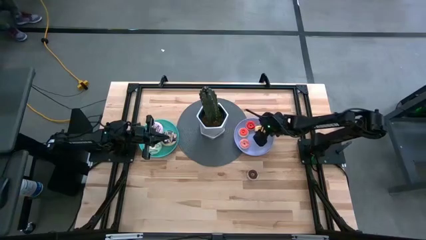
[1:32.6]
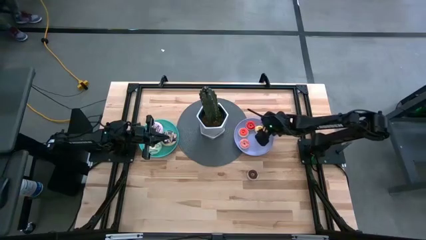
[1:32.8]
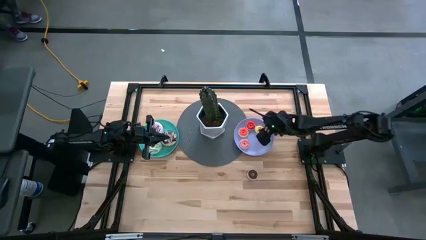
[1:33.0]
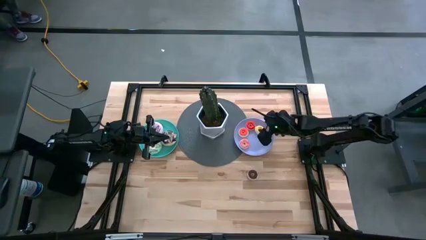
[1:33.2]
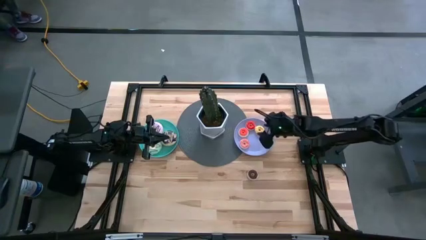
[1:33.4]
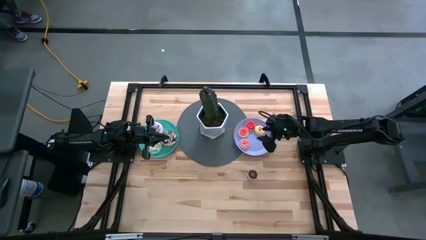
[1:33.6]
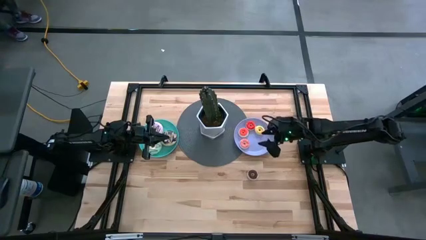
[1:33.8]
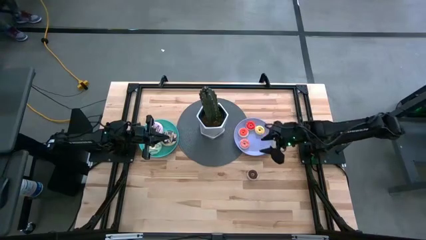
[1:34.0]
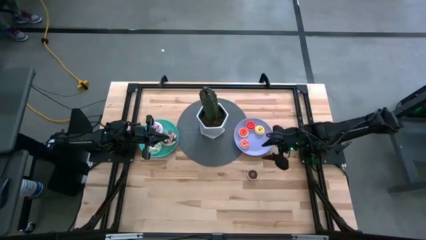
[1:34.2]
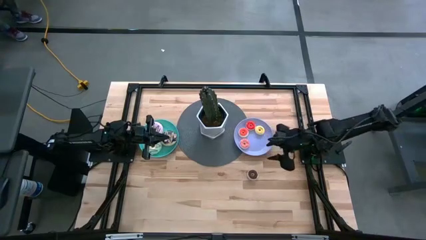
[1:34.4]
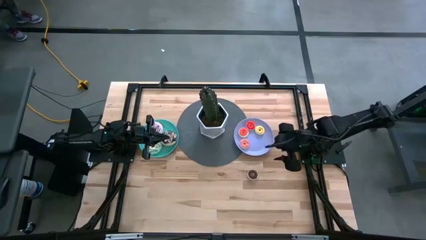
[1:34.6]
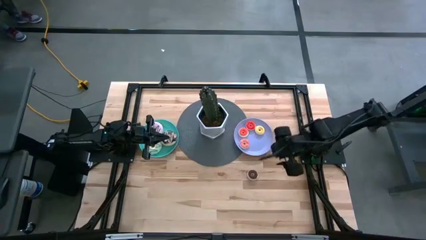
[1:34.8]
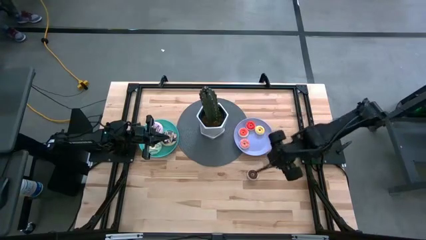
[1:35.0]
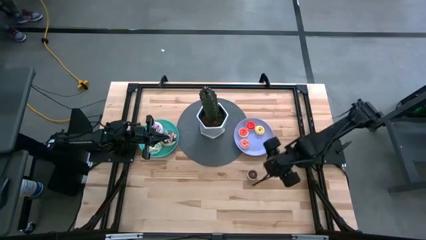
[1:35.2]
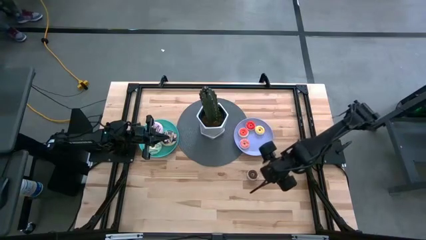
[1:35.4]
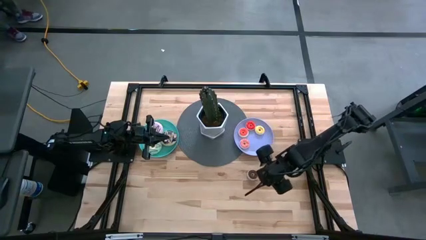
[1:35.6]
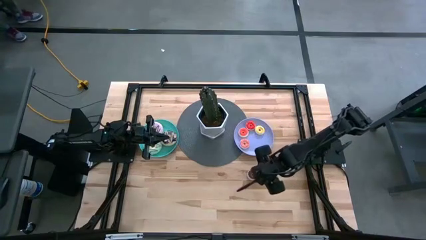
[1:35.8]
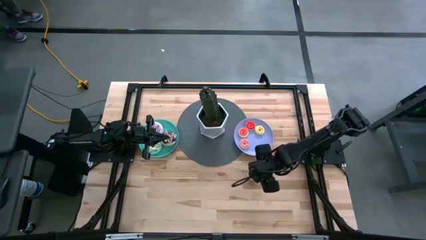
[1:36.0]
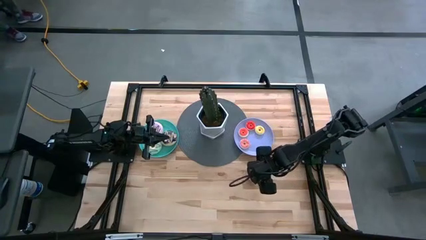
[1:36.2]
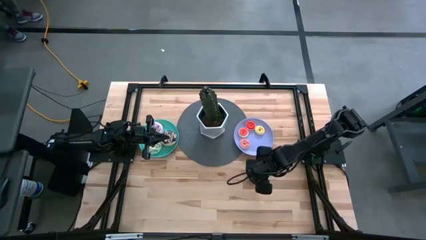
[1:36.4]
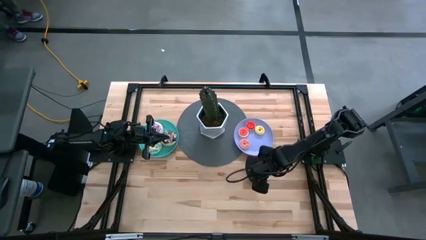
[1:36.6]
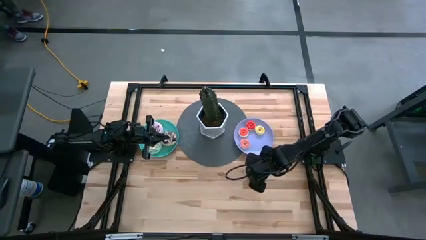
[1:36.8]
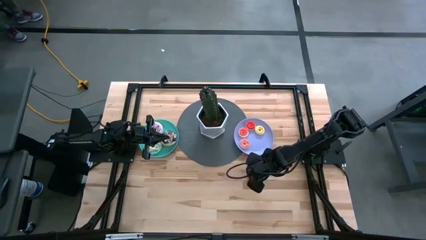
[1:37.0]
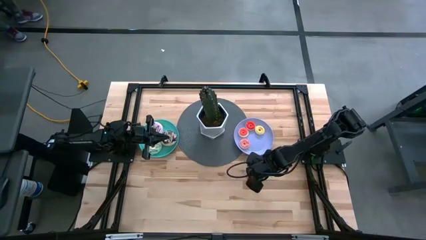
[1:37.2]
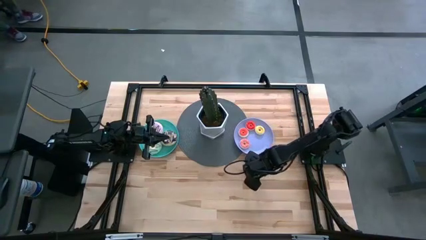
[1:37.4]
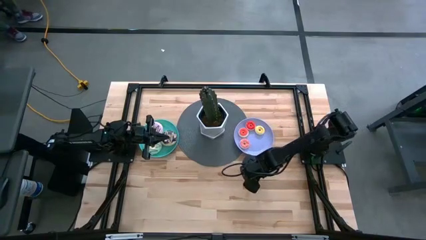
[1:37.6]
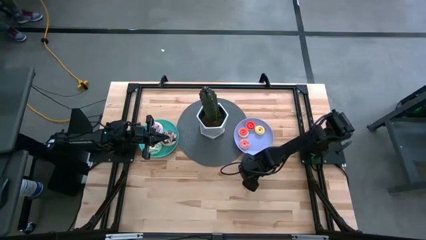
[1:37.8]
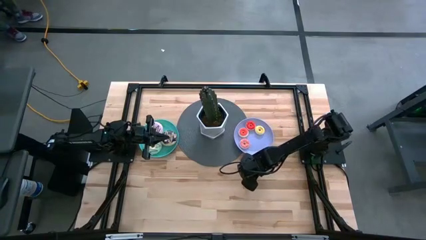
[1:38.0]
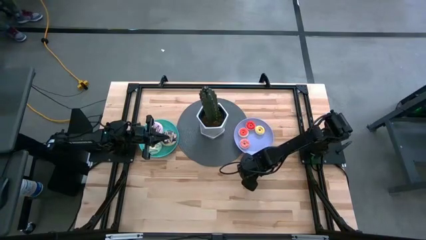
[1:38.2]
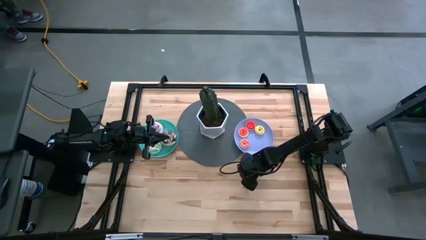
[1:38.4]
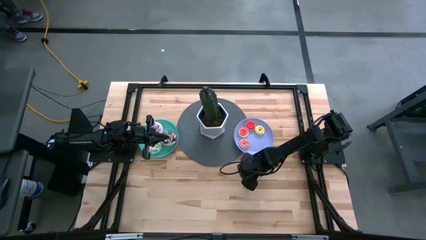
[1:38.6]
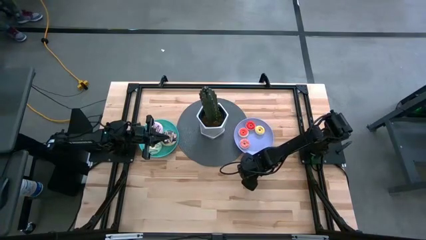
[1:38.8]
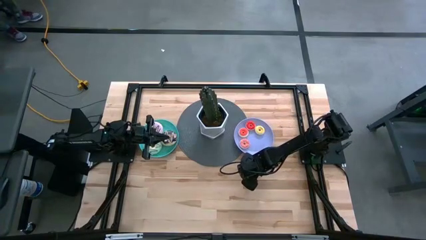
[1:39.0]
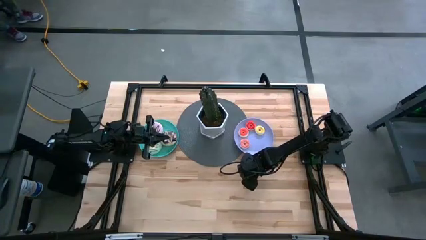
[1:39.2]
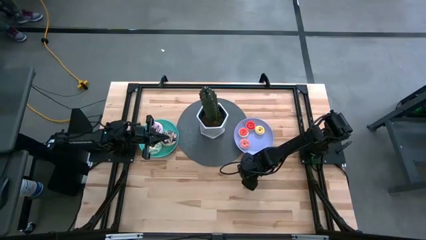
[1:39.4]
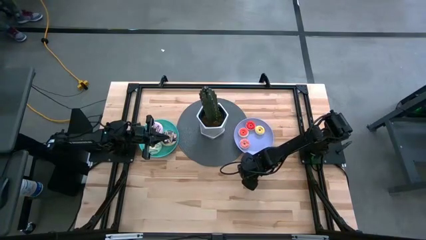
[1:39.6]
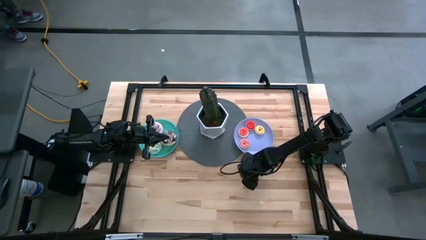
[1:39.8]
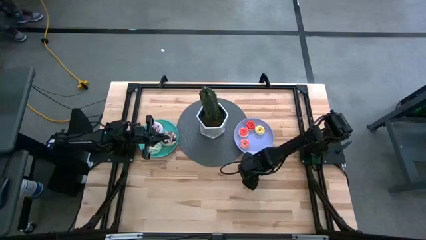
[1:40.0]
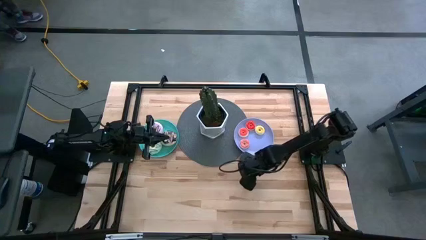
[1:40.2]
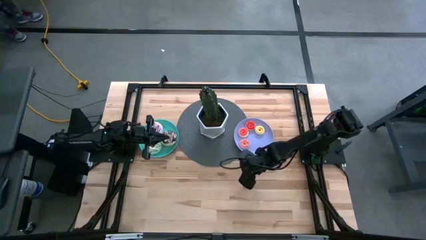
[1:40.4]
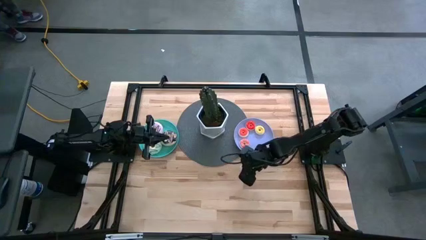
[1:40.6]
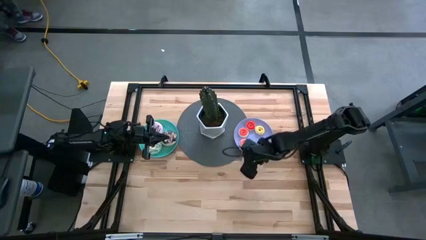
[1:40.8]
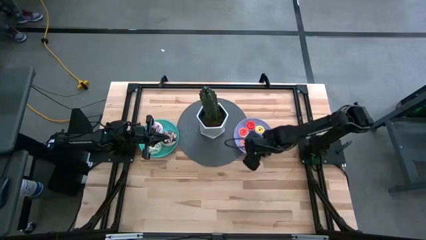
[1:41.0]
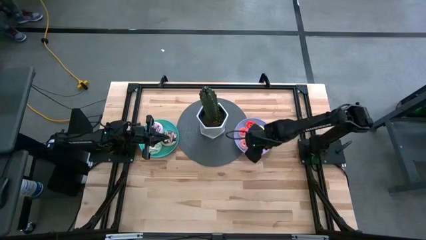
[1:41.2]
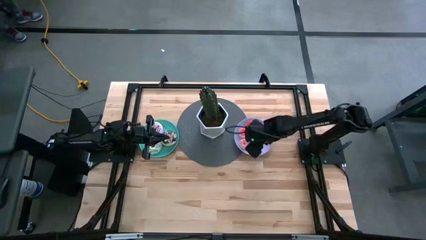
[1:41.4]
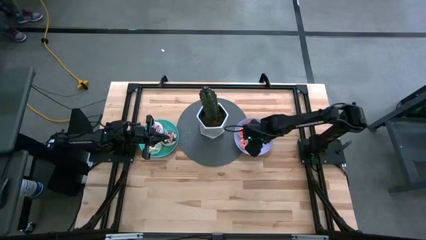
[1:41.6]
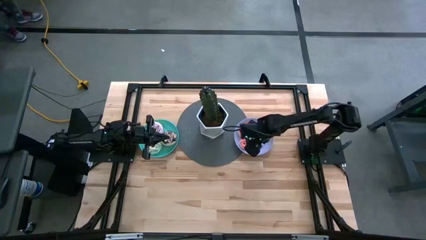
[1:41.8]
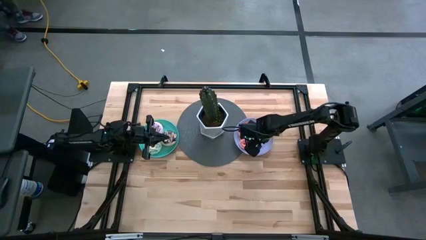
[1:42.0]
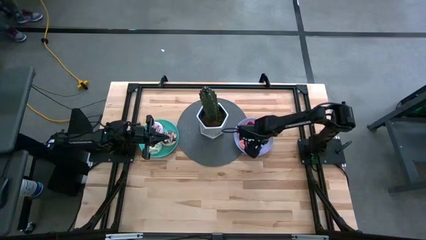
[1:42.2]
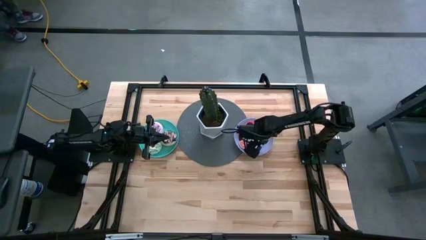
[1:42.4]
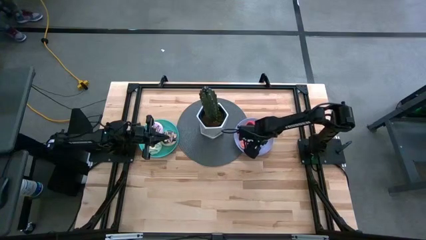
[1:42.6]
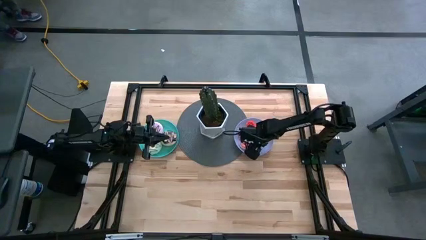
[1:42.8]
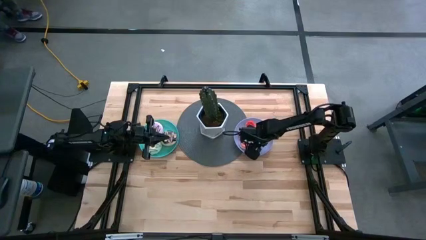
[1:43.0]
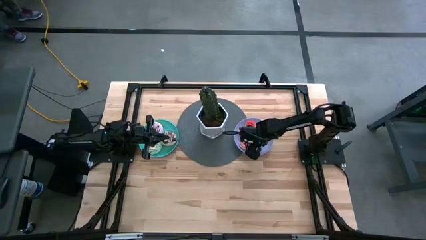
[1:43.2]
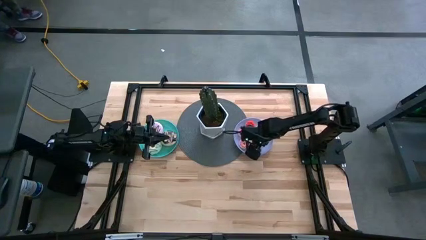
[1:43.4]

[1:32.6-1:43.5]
Task: Pick & Place donuts
Put the small brown donut on the purple plate

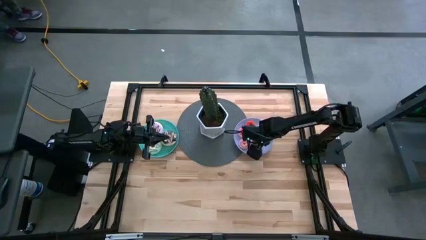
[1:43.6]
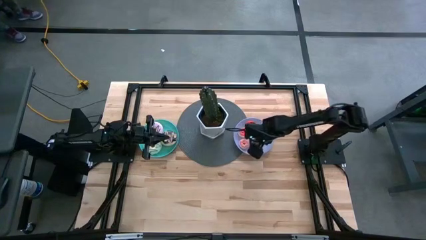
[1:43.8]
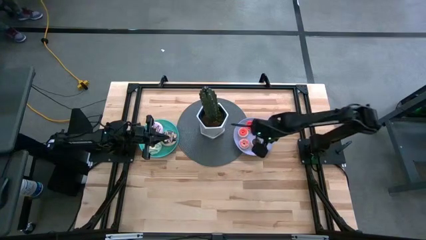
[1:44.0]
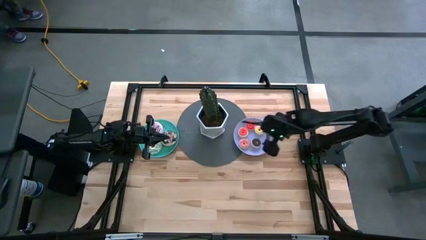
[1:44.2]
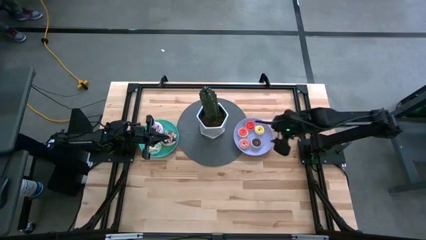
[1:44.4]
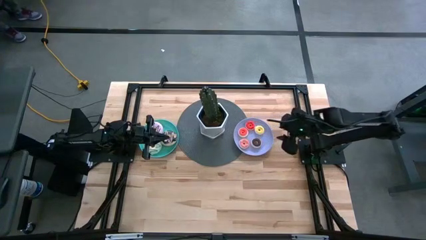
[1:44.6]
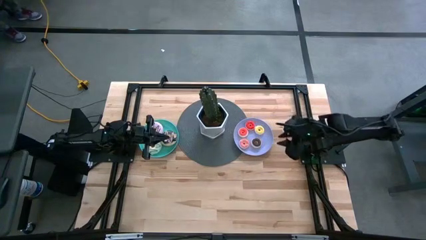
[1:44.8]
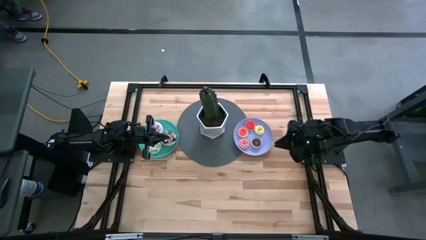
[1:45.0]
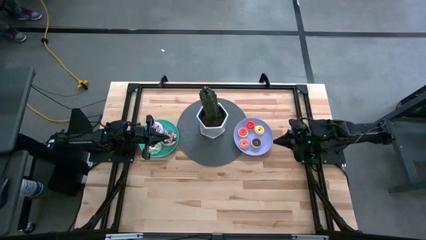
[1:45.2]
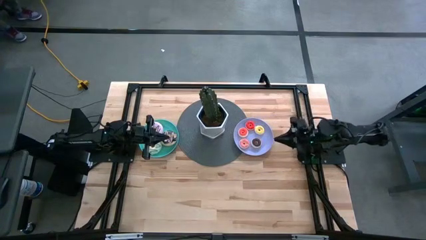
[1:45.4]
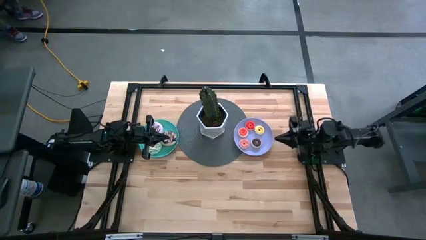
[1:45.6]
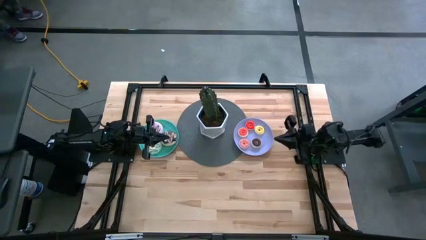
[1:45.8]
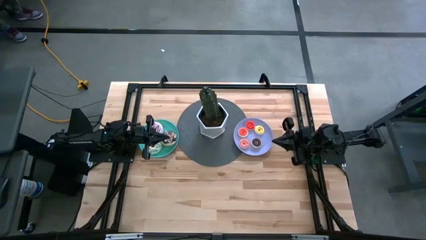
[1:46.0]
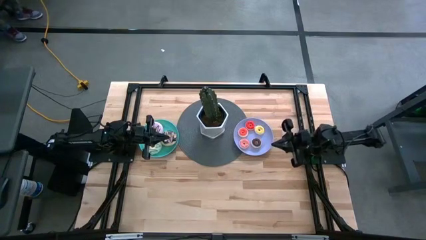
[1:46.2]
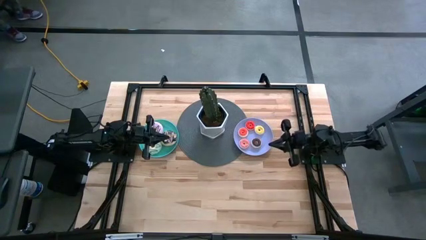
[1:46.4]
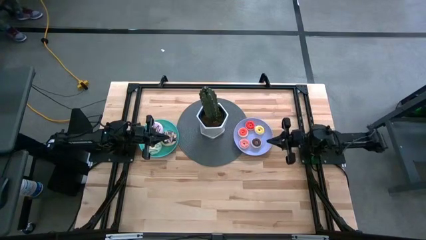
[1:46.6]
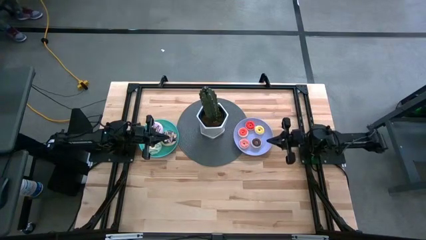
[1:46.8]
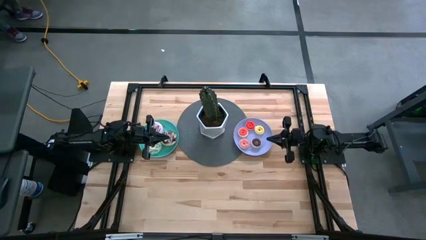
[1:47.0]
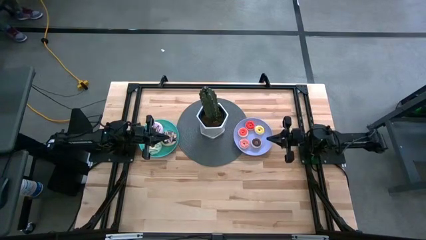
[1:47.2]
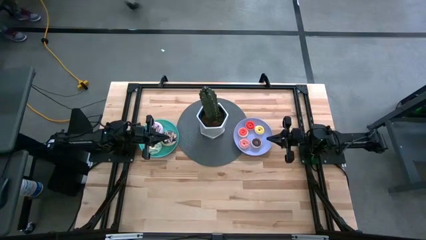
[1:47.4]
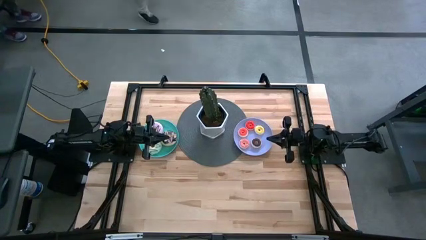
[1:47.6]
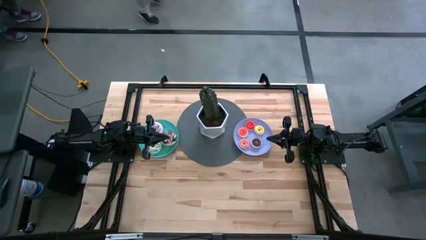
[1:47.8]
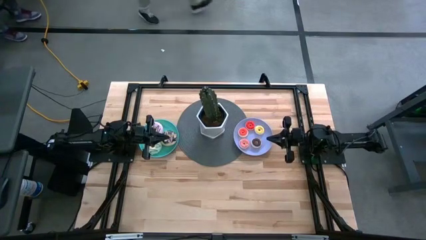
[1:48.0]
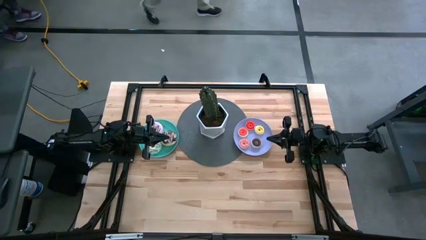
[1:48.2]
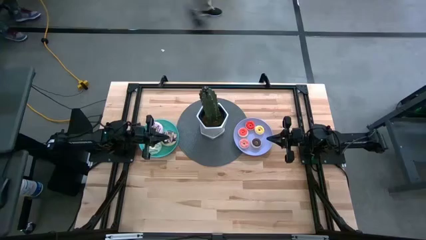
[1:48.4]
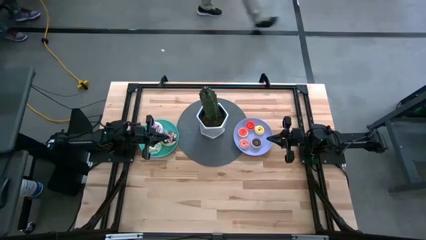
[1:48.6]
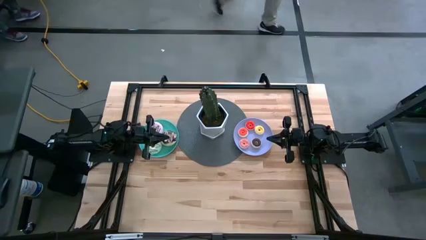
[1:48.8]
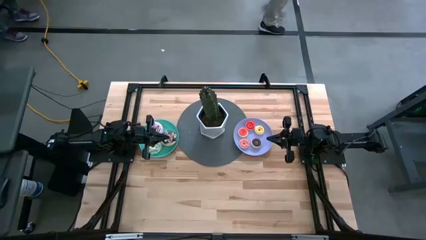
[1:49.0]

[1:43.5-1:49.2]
Return to Home Position
